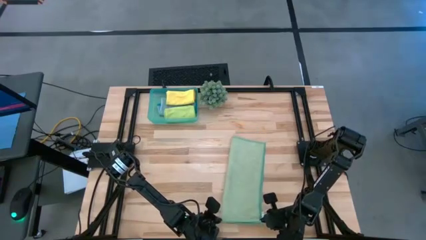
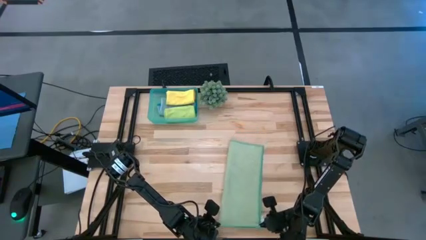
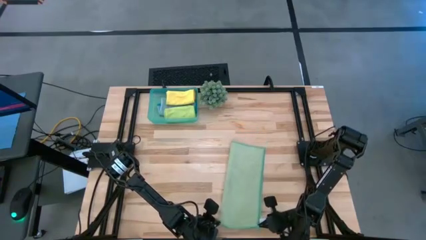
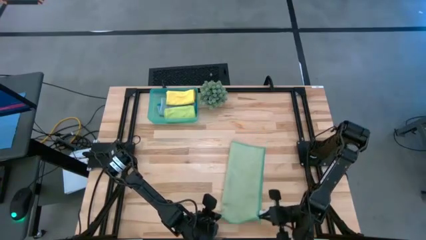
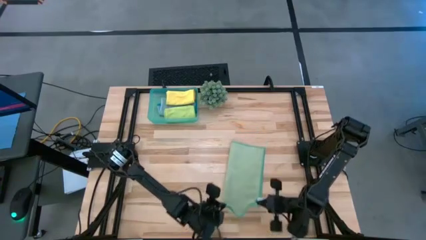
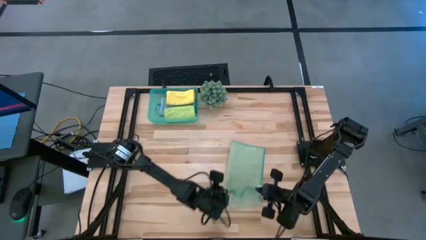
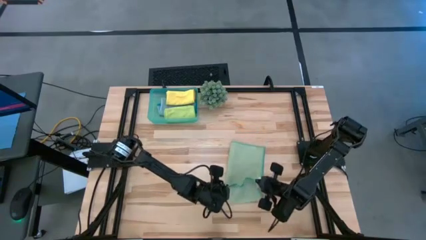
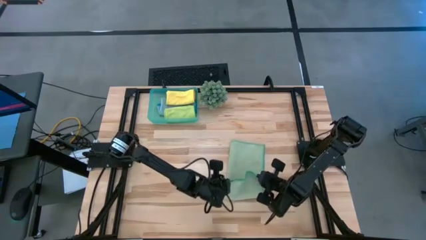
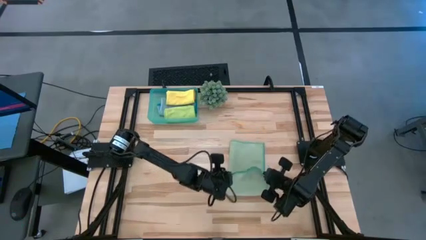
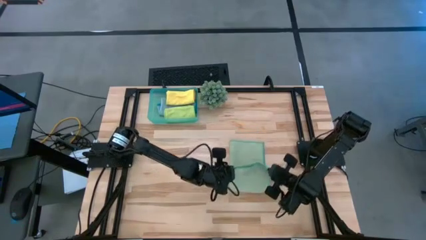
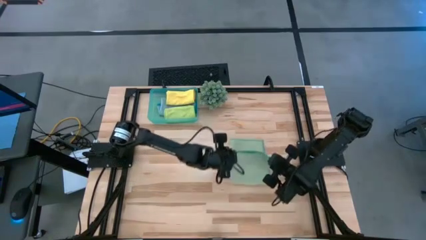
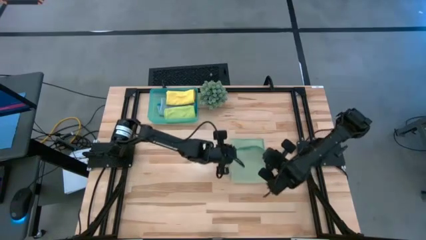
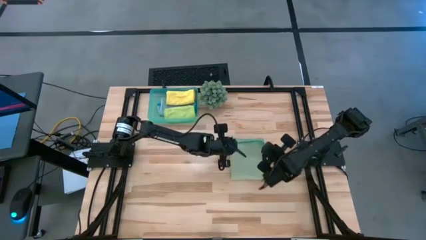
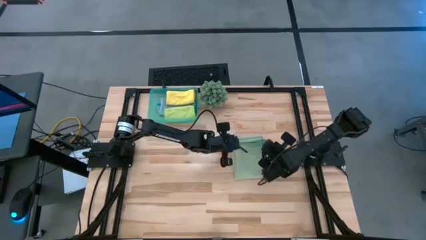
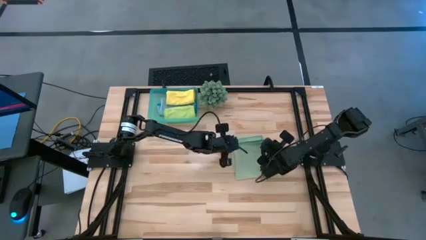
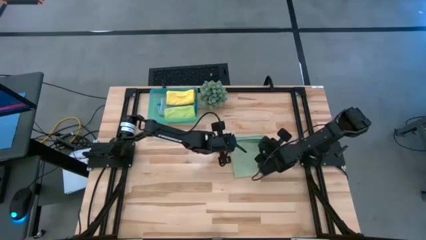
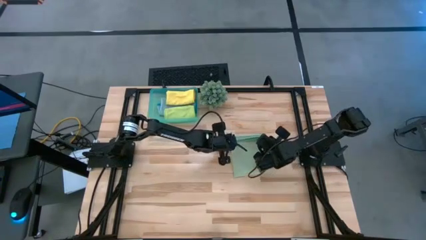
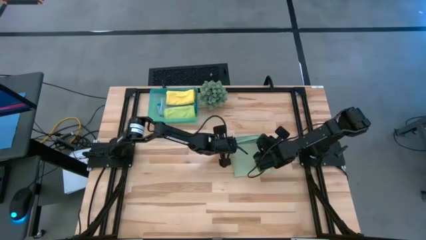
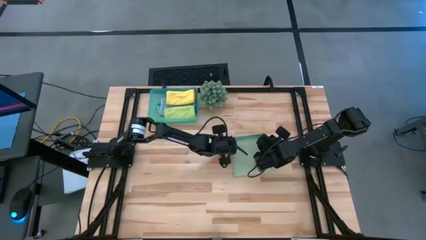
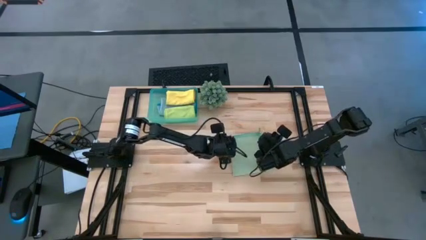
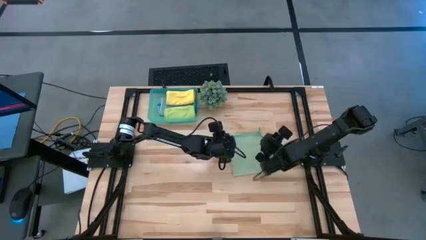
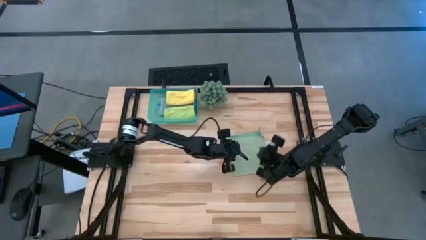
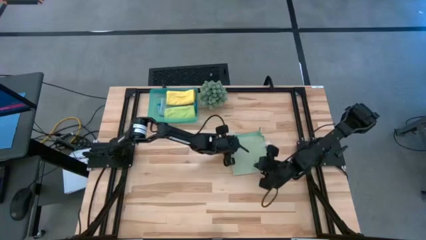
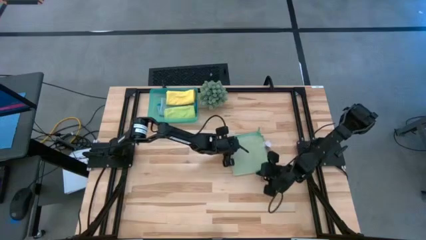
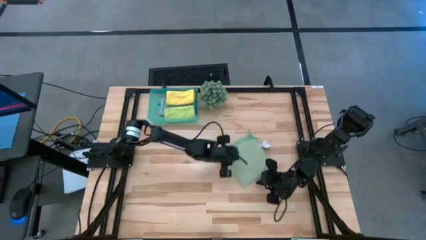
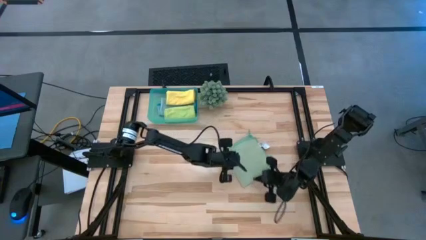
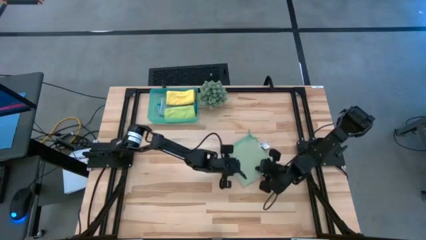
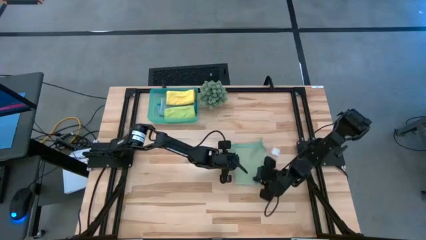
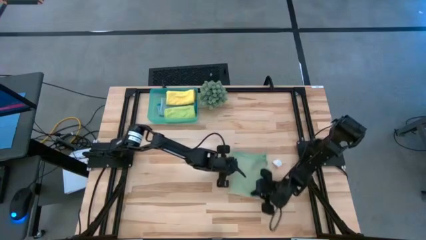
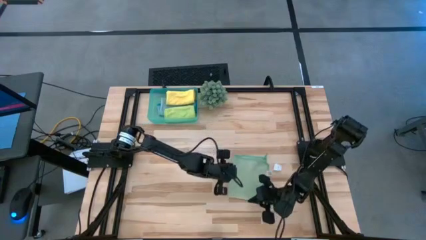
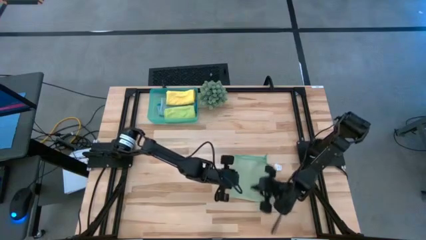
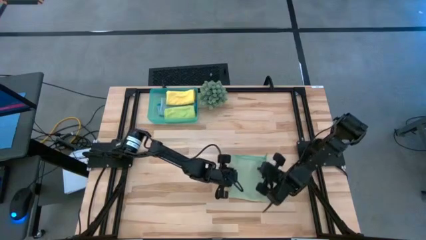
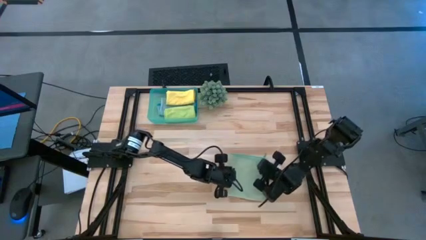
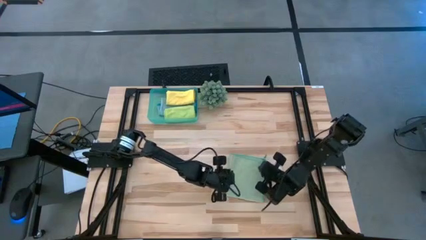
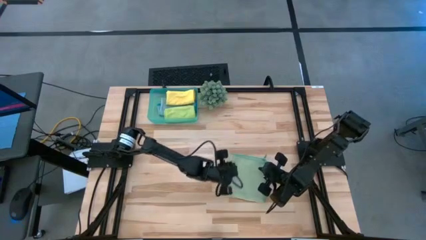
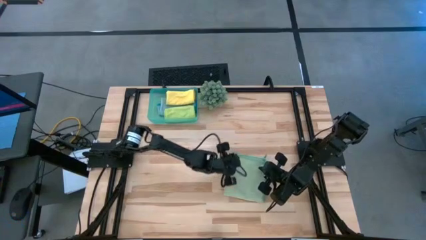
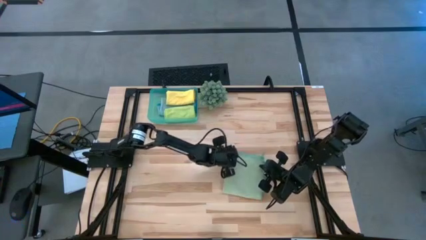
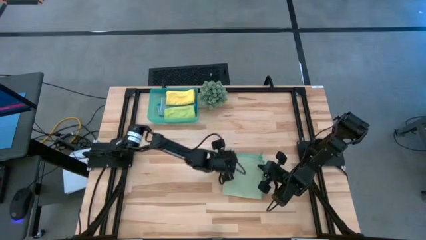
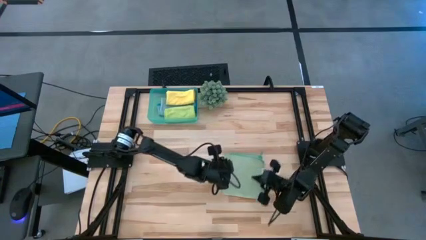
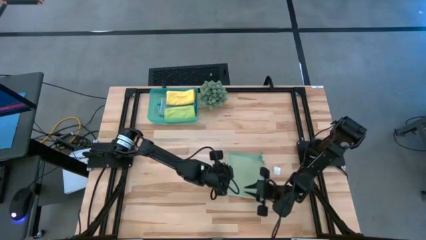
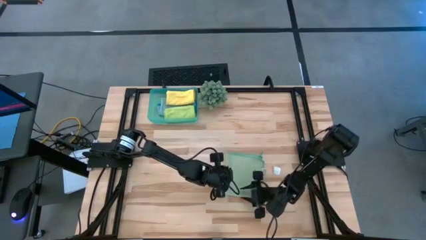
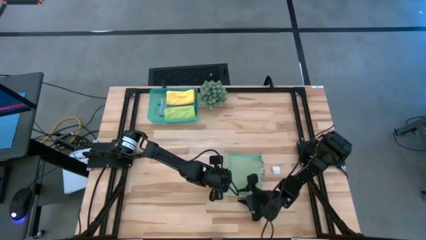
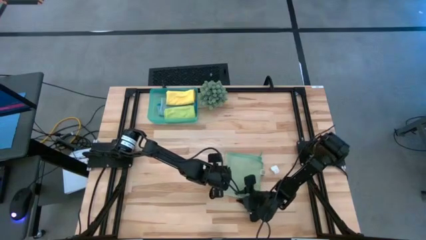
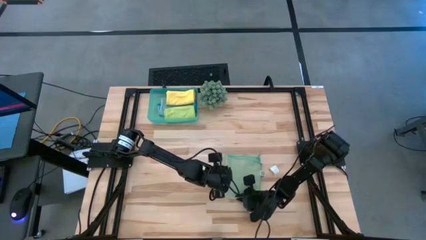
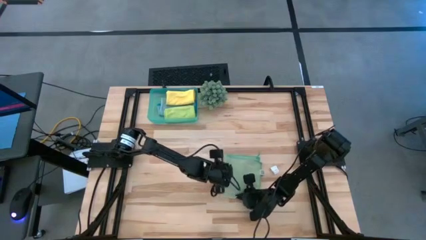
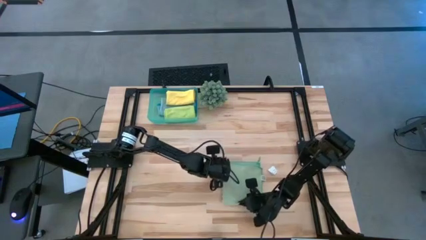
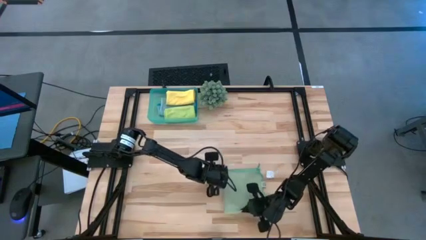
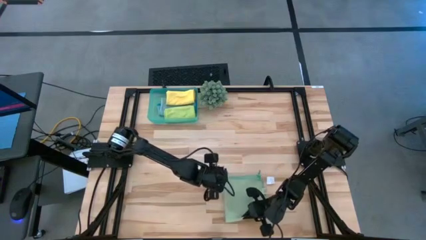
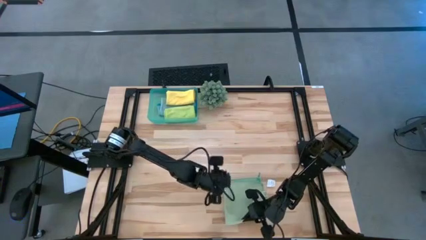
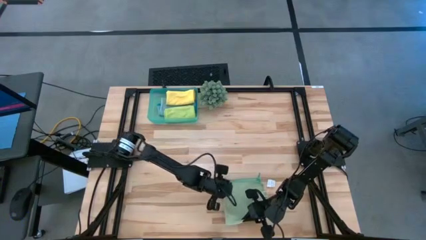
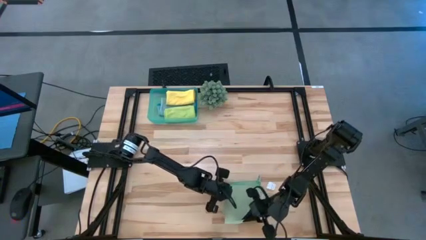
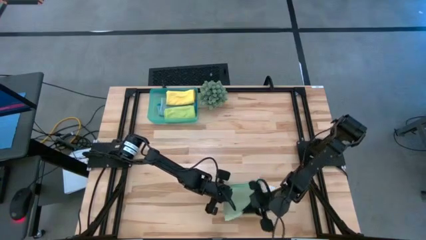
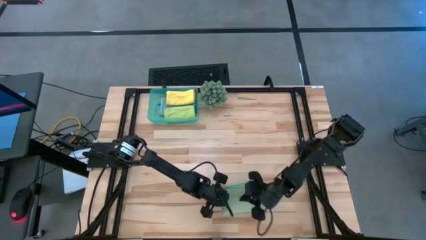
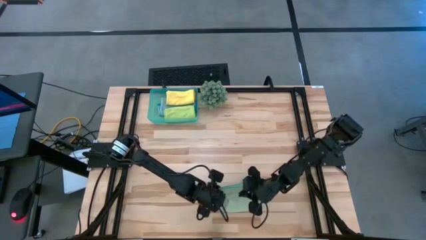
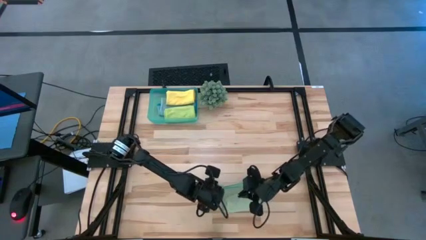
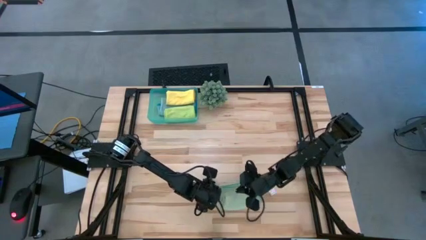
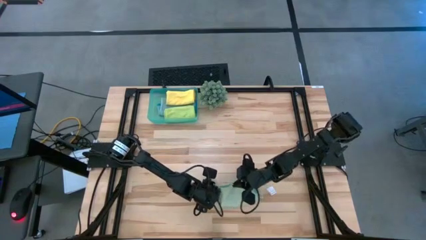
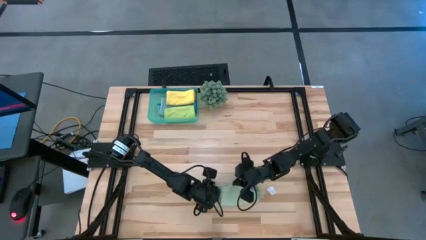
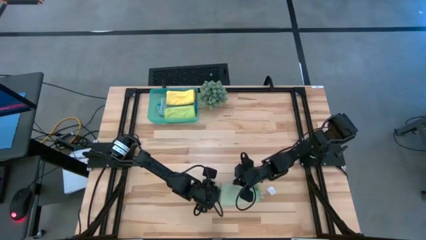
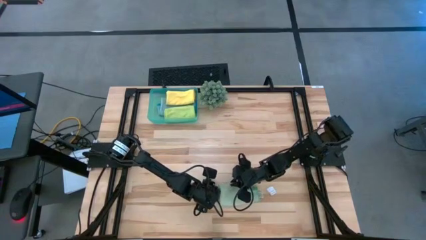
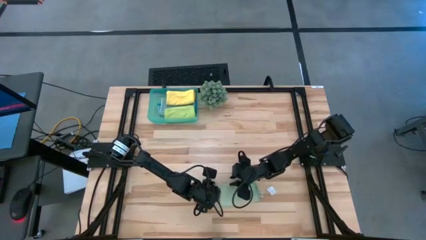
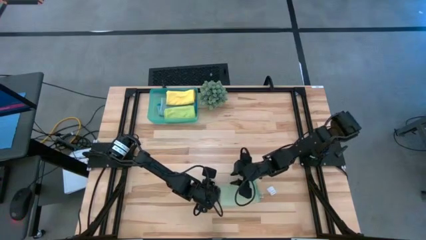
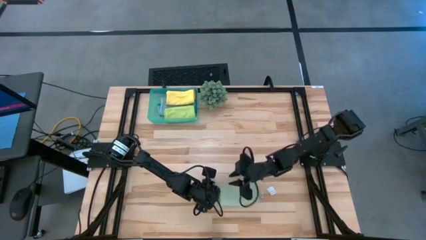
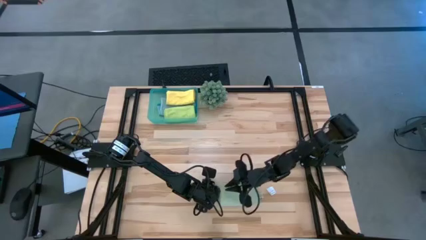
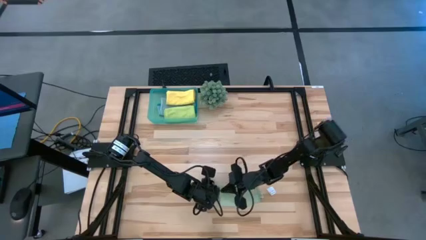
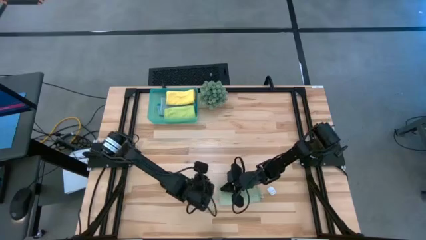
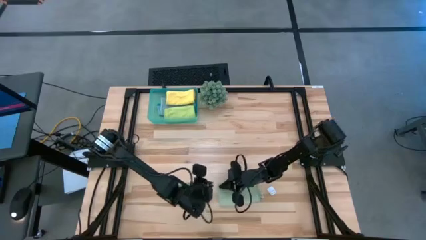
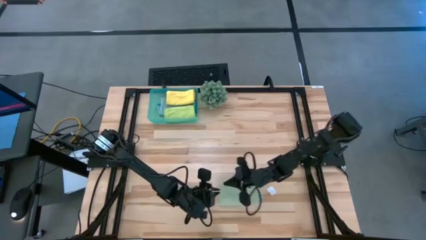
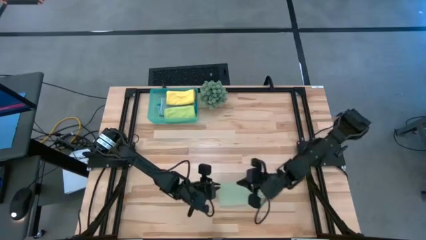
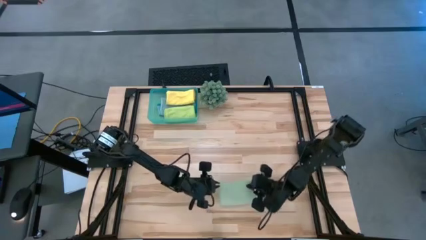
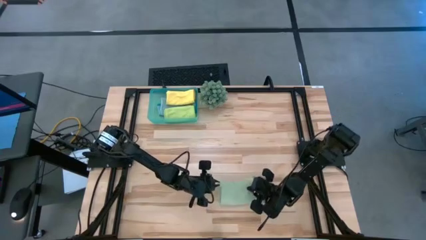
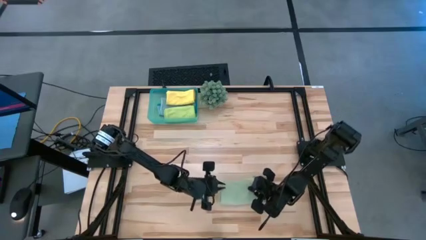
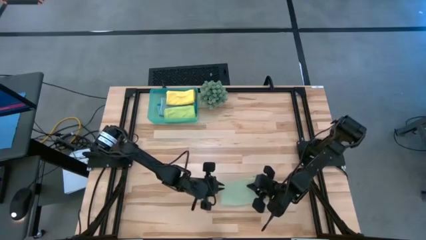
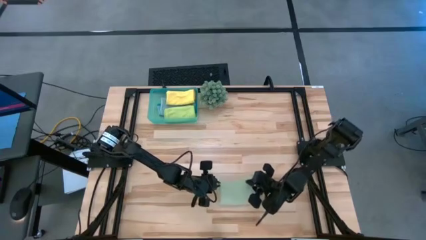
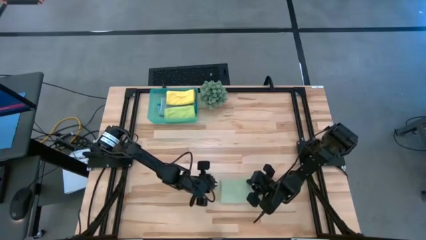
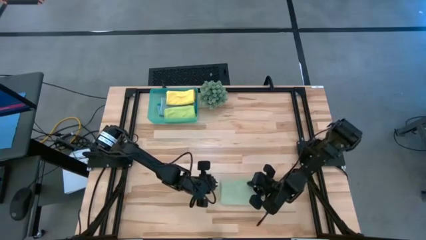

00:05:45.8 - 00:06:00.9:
Task: Fold microfiber towels
Fold the green microfiber cloth
